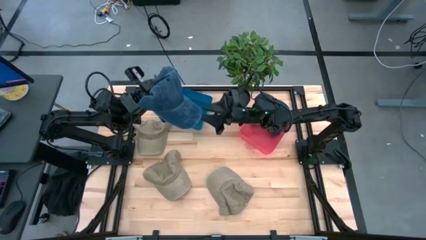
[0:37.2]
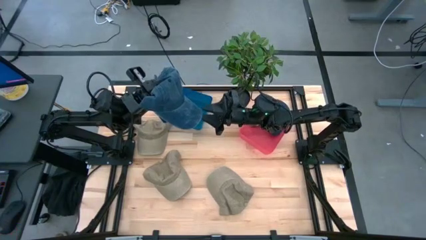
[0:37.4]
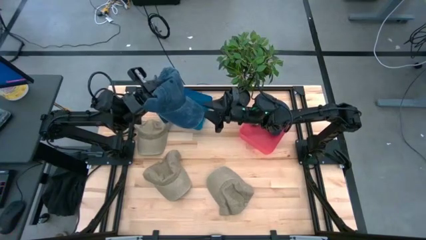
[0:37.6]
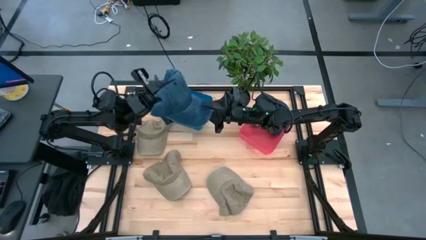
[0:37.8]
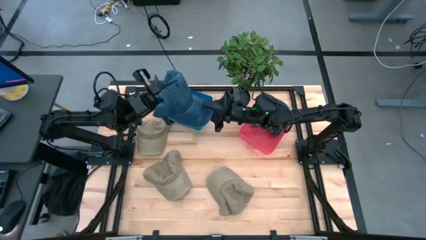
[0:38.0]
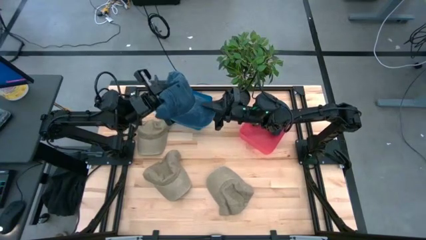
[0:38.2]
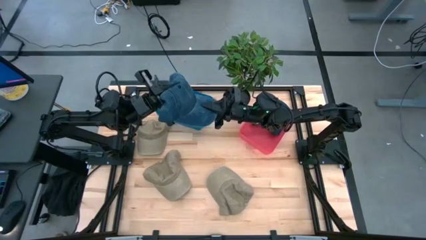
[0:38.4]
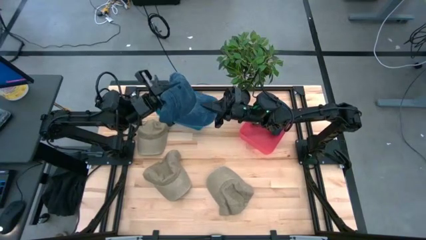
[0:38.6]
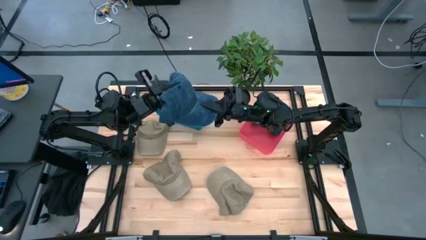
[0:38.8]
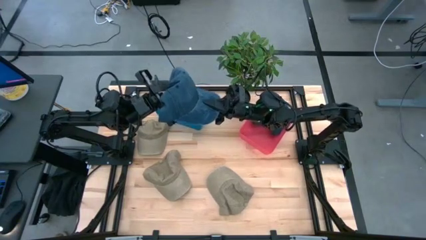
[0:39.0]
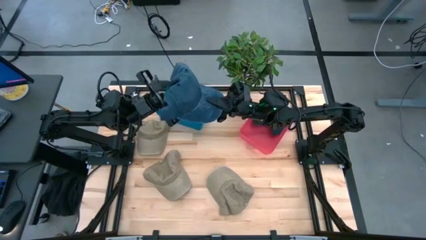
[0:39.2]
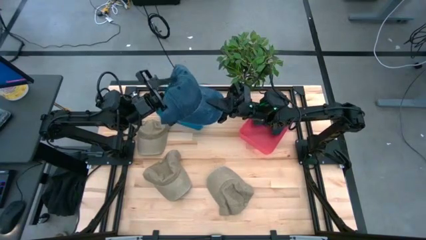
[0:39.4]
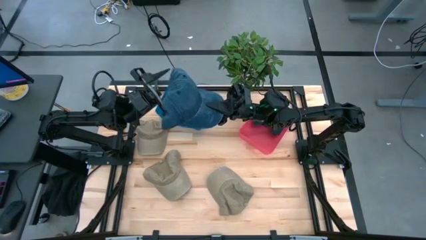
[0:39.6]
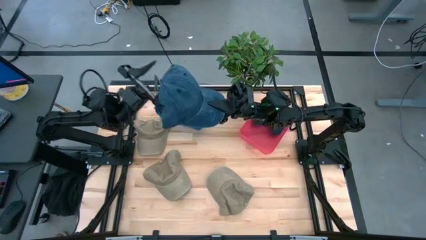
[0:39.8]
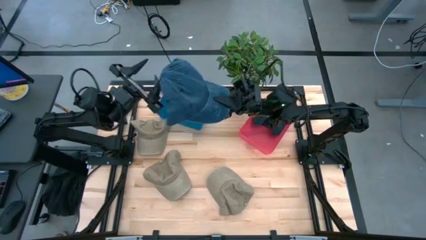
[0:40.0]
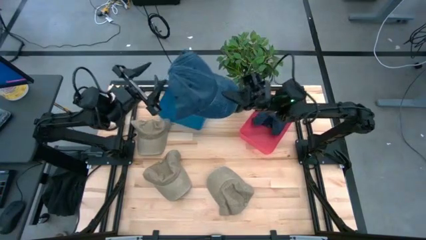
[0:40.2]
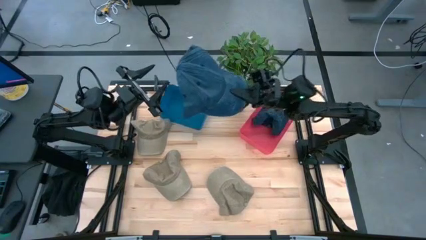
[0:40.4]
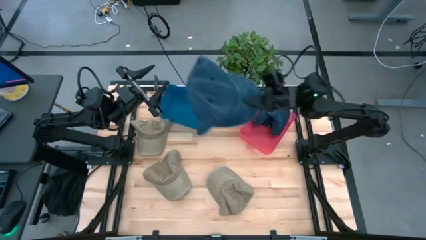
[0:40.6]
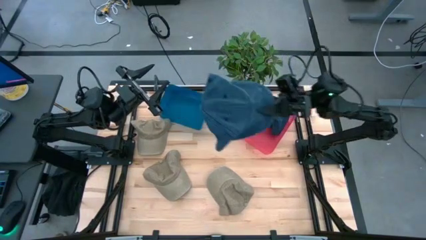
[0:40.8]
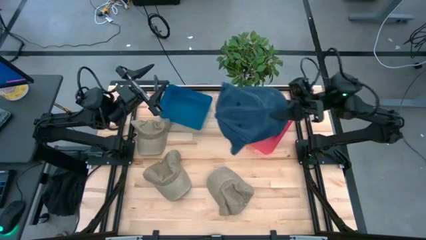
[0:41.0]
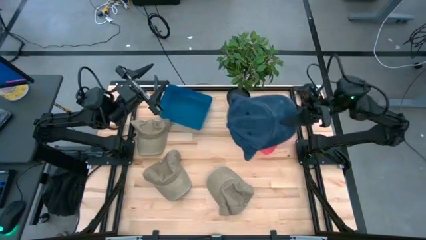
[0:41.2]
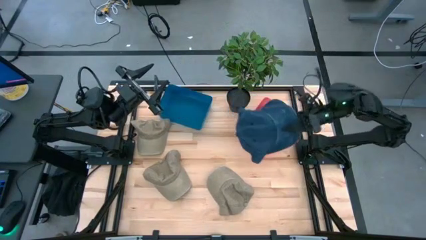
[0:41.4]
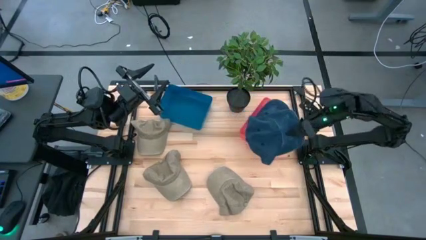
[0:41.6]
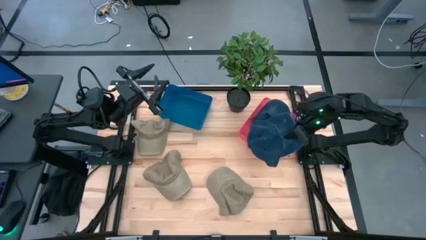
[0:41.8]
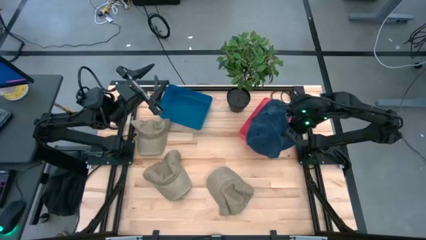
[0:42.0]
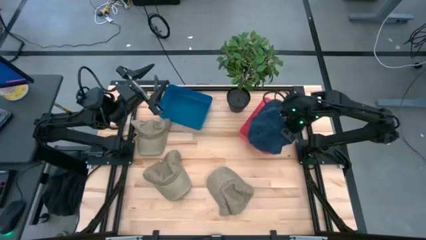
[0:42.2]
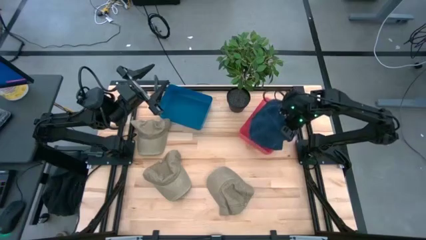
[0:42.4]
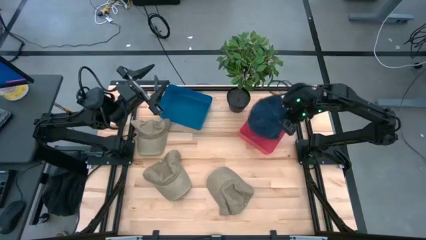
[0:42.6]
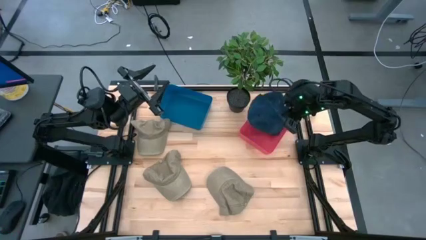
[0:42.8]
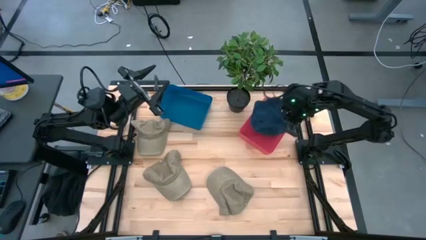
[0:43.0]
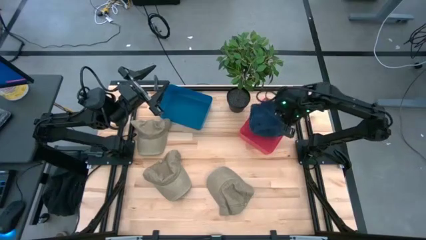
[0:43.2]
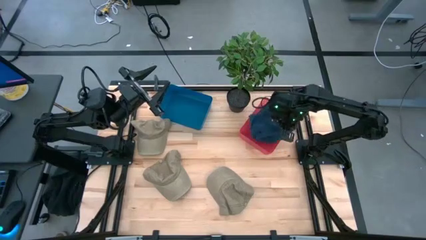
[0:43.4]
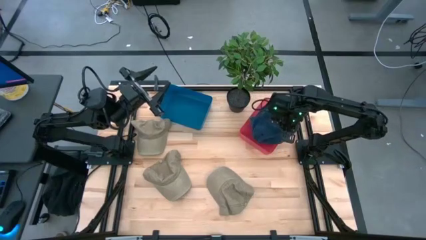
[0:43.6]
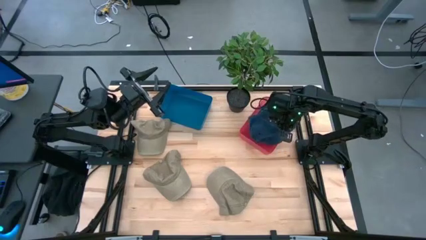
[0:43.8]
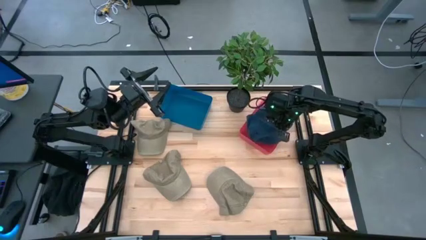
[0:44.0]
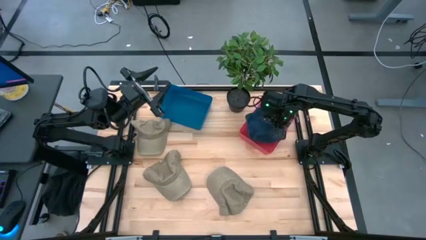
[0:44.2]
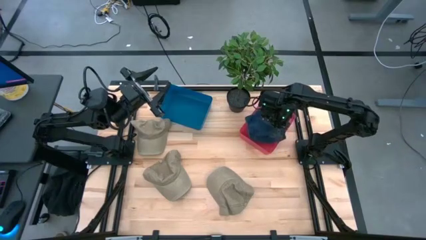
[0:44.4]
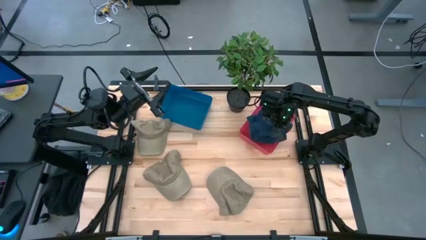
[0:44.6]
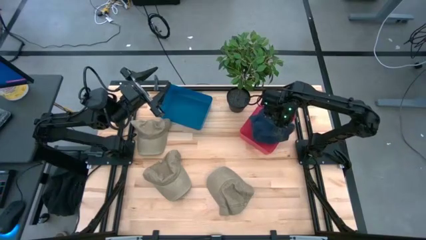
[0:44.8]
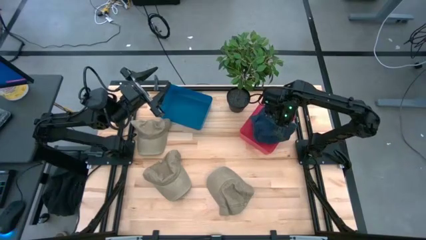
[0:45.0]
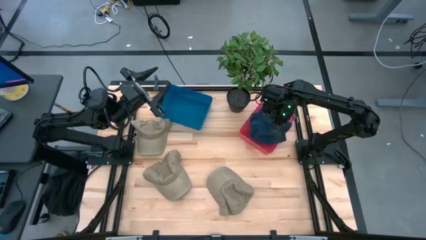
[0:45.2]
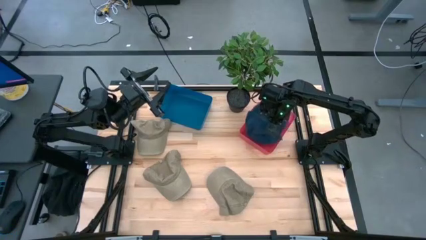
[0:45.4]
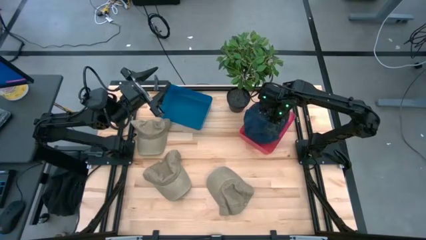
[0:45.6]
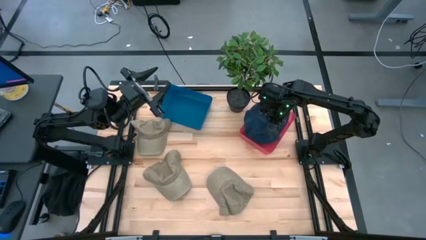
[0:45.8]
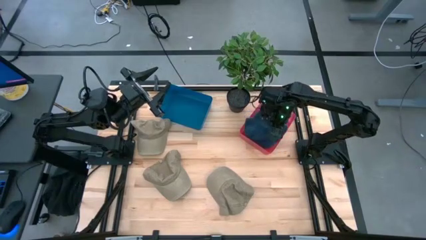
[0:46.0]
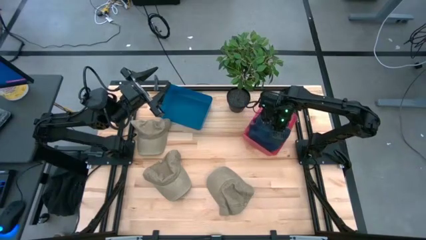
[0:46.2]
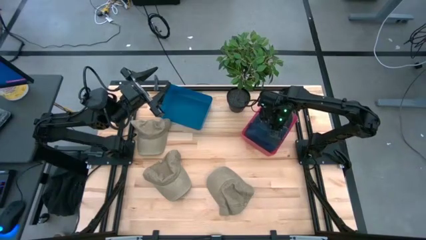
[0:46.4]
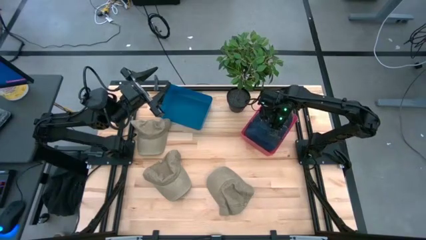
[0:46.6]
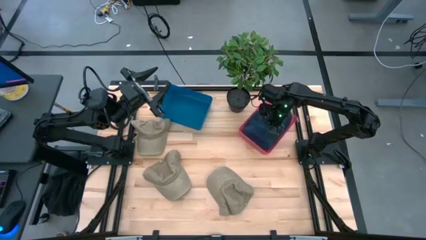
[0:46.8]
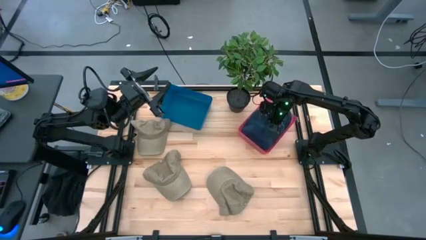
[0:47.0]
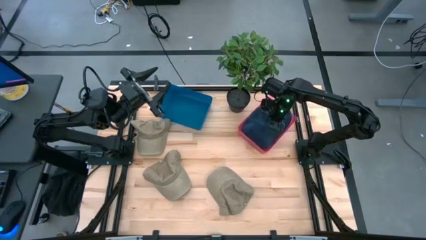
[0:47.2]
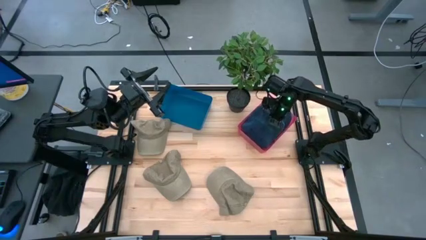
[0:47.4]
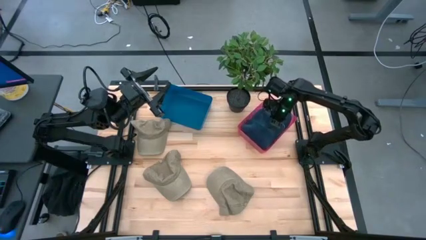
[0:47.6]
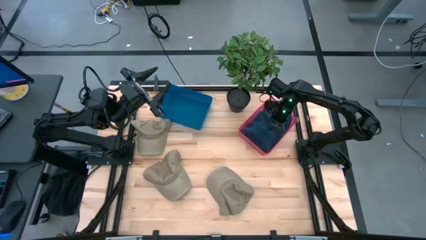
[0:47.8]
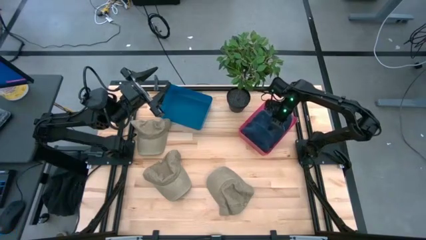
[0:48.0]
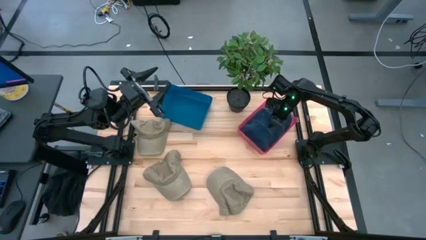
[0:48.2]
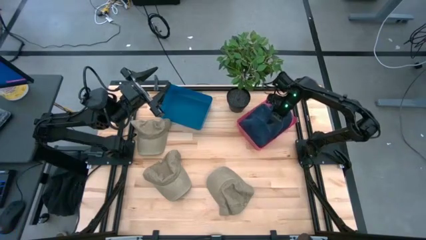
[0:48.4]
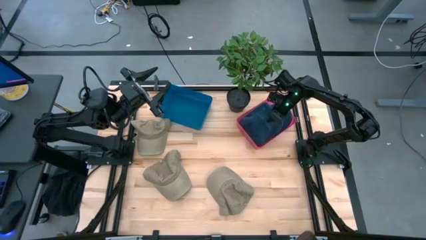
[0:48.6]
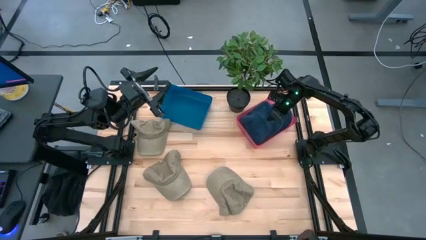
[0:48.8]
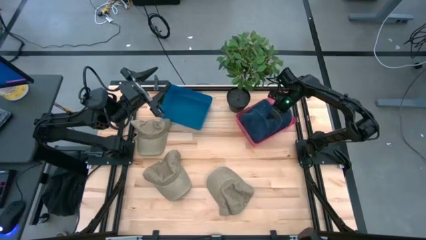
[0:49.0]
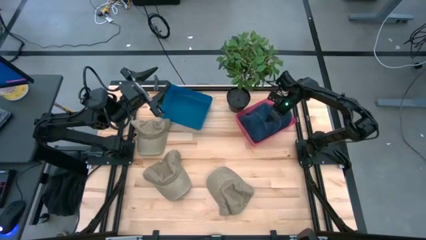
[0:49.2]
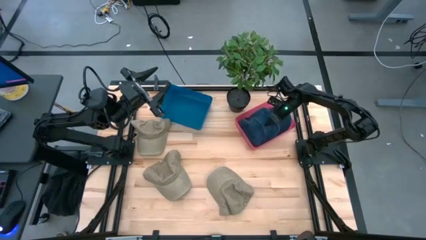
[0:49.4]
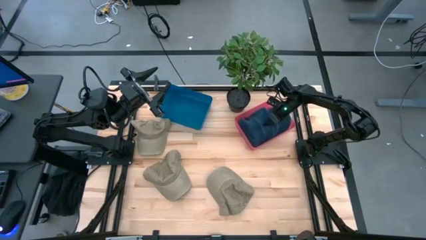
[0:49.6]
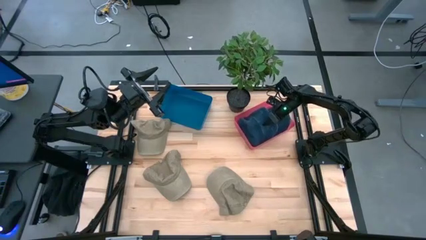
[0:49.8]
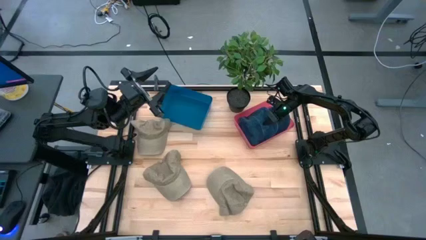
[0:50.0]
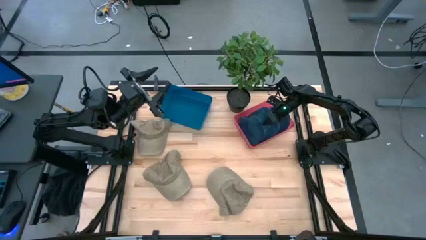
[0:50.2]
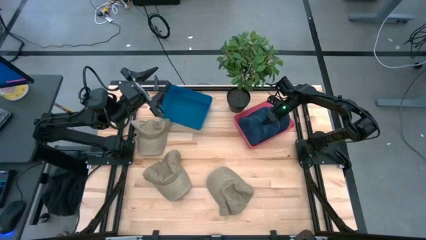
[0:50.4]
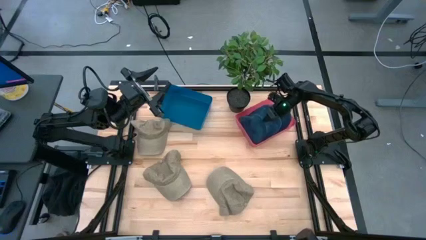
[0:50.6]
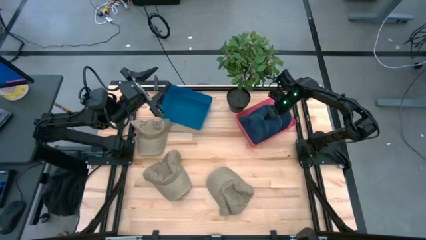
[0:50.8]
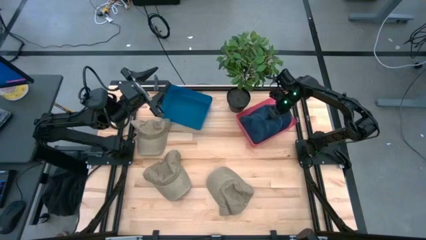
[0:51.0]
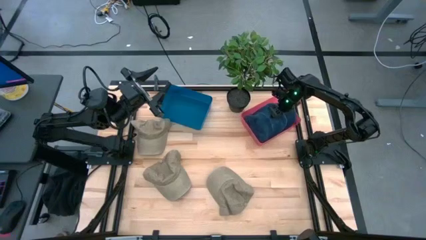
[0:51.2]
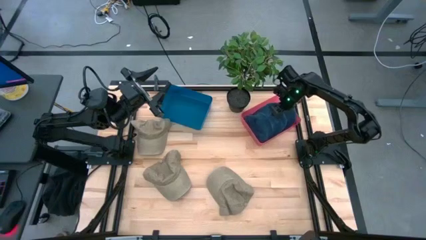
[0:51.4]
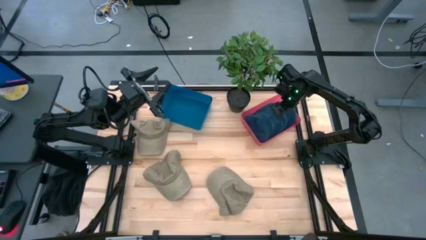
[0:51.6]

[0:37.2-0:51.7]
Task: Pick & Place hat
Put the blue cap into the red bin
